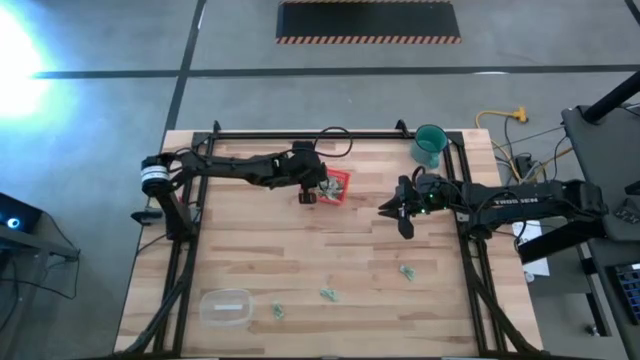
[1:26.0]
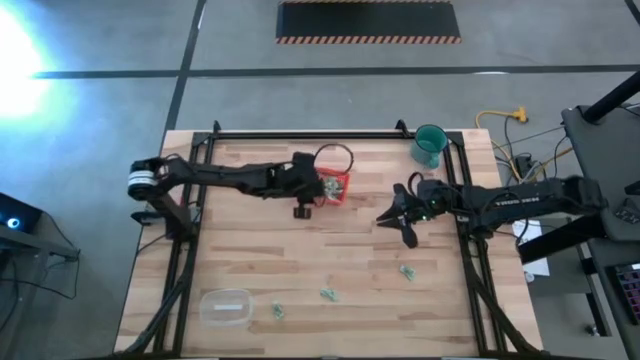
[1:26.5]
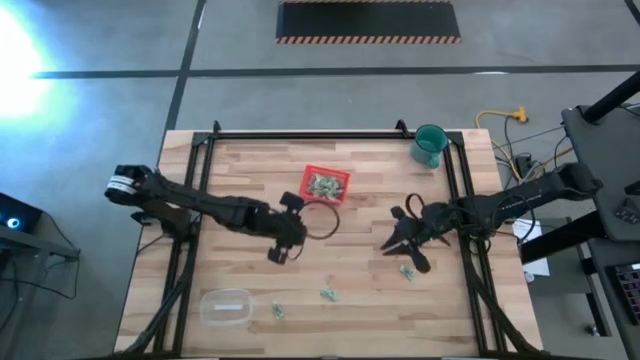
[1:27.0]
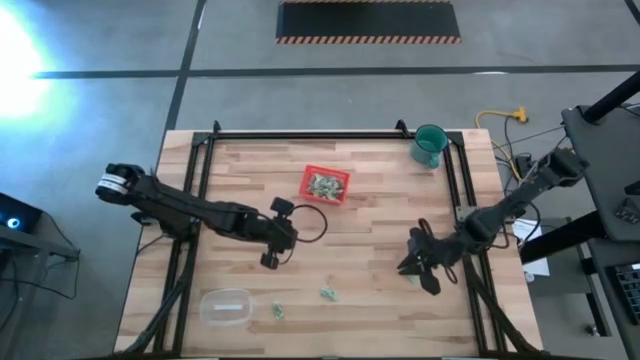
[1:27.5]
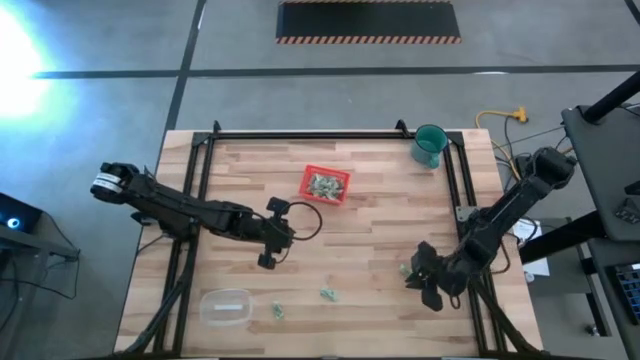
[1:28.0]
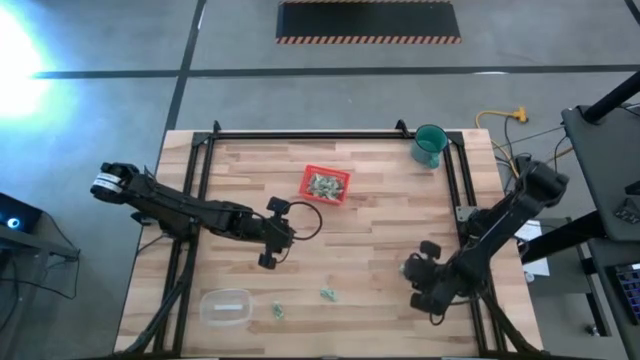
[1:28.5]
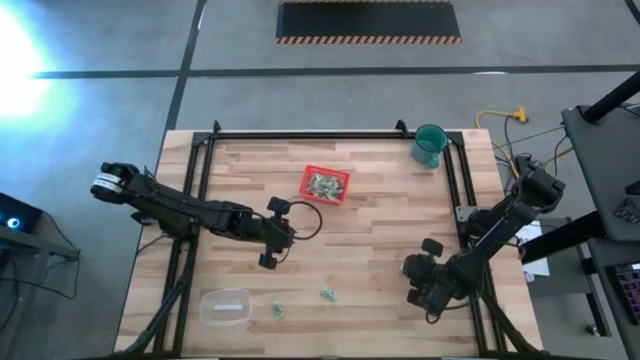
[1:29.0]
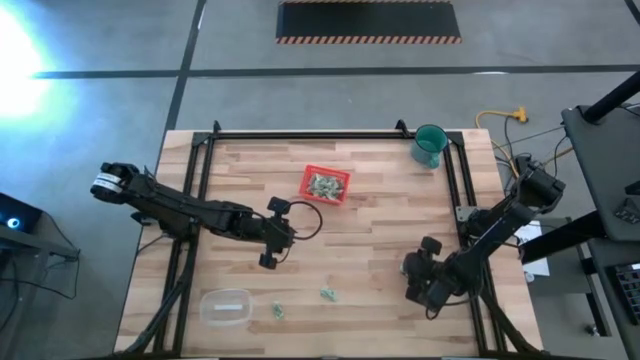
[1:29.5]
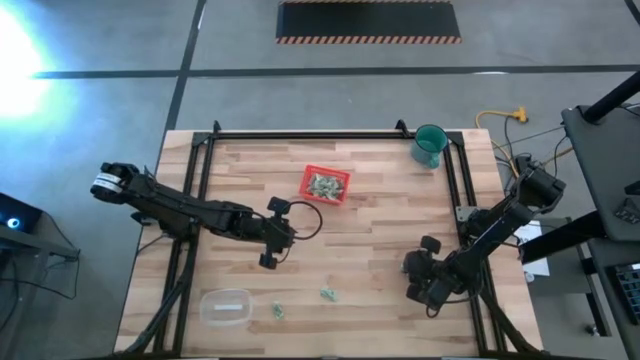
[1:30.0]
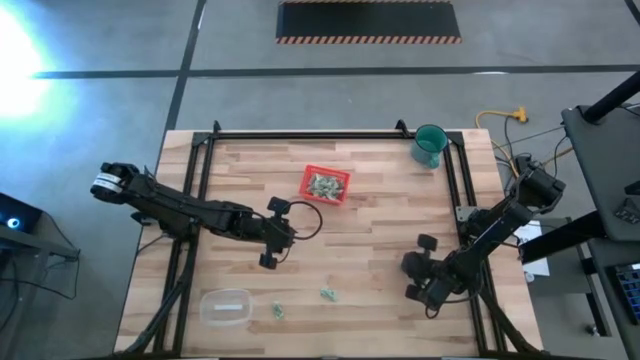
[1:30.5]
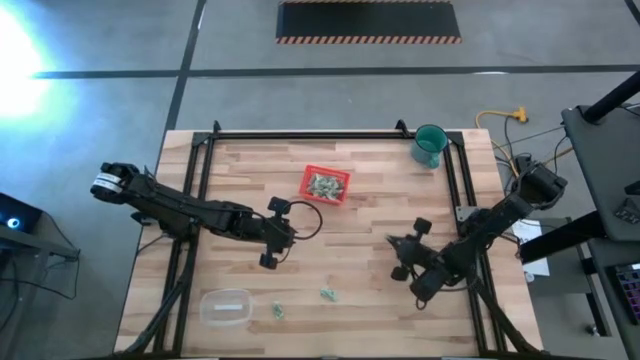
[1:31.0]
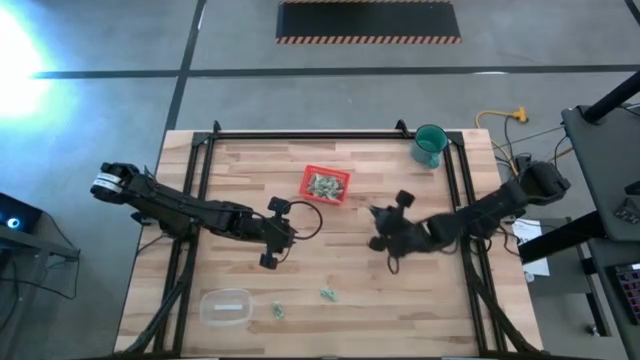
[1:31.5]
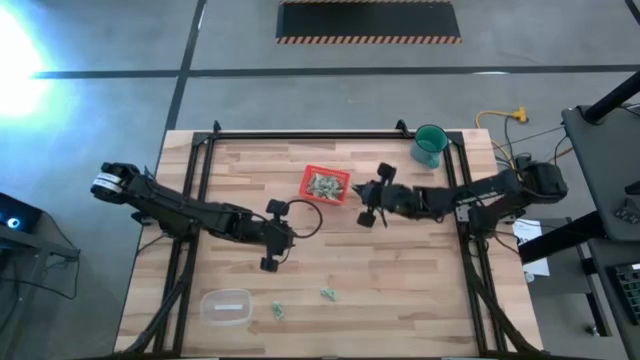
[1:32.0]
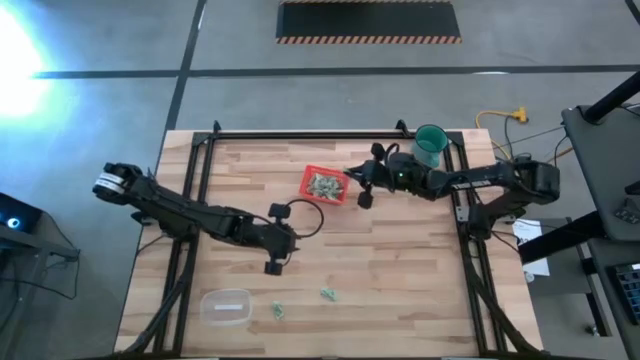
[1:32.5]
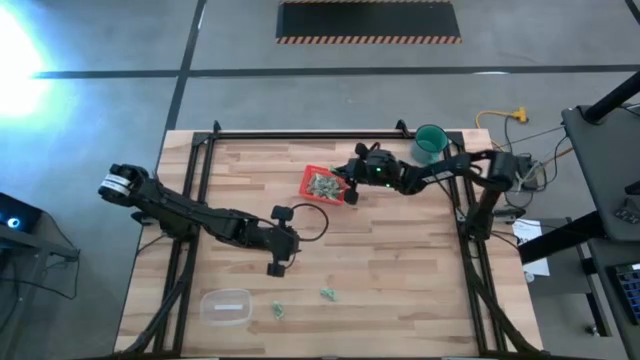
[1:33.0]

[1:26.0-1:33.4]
Task: Pick and place items into bin
Put the stevia packet into the orange bin

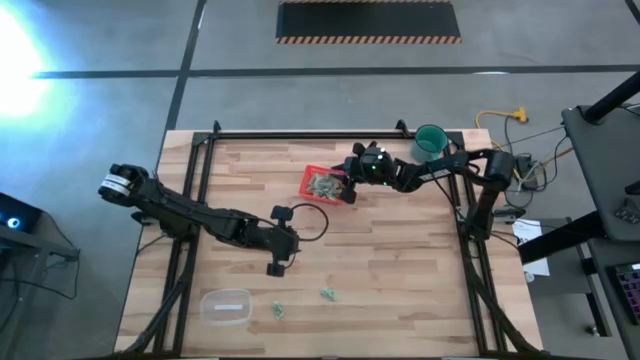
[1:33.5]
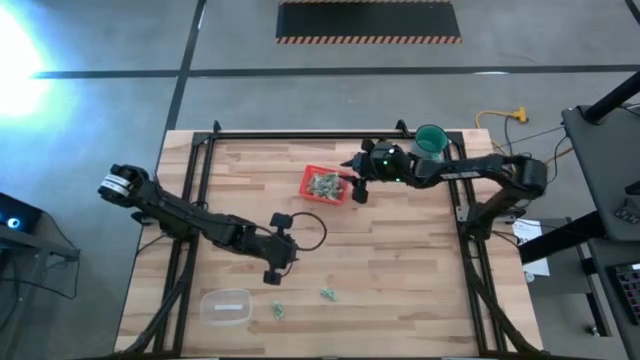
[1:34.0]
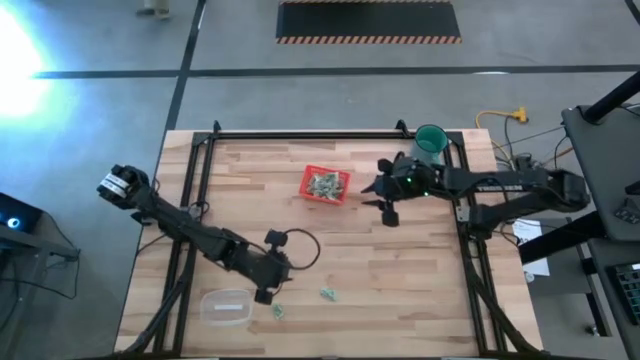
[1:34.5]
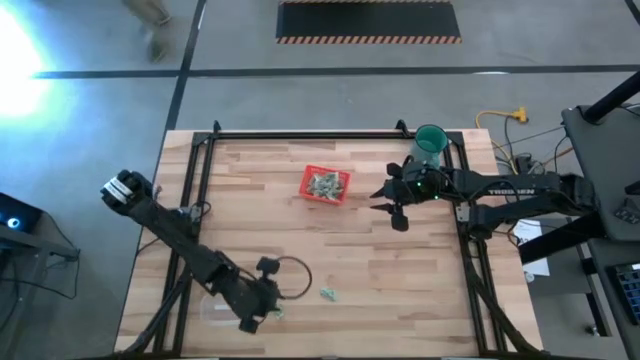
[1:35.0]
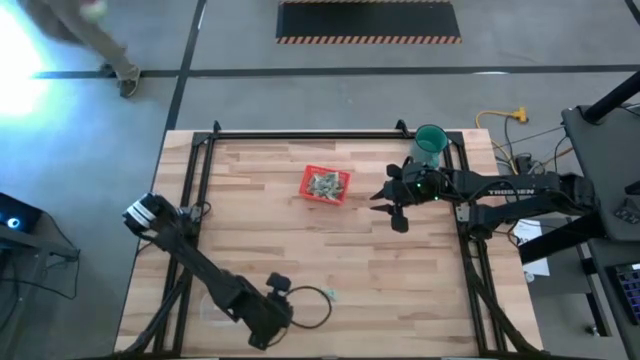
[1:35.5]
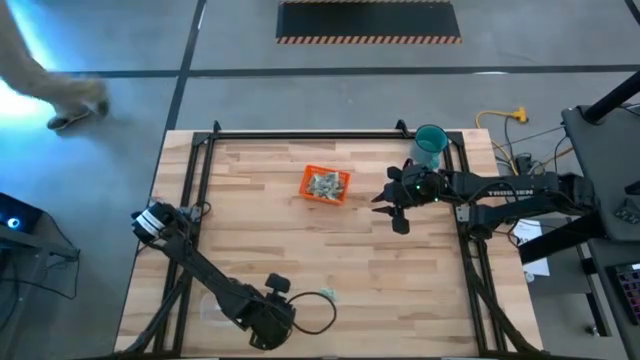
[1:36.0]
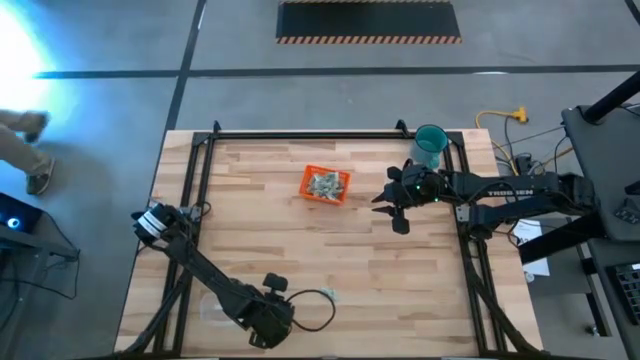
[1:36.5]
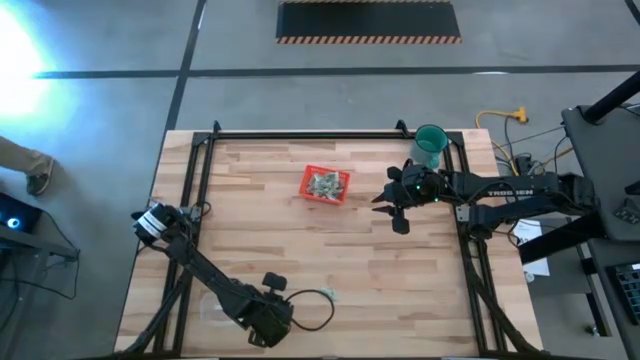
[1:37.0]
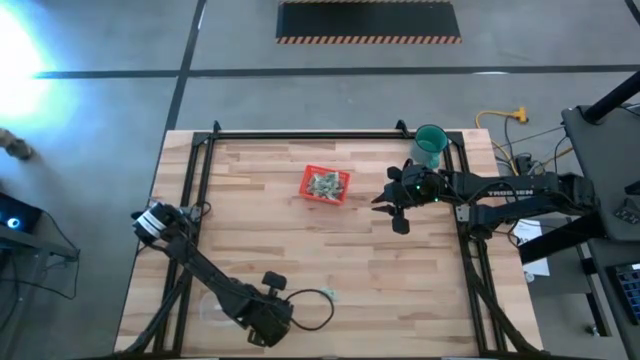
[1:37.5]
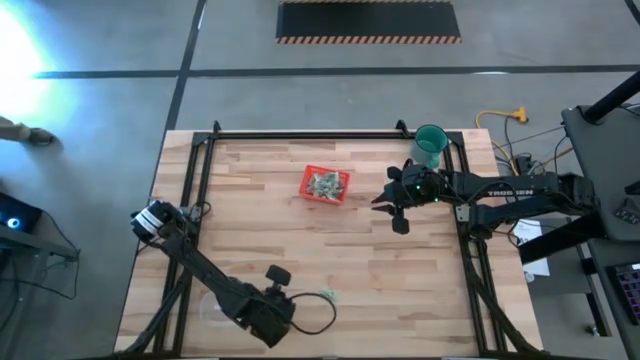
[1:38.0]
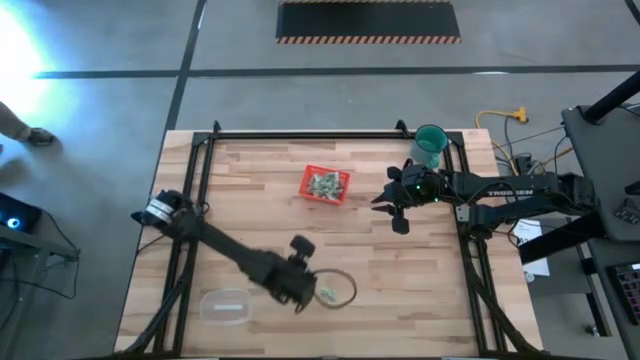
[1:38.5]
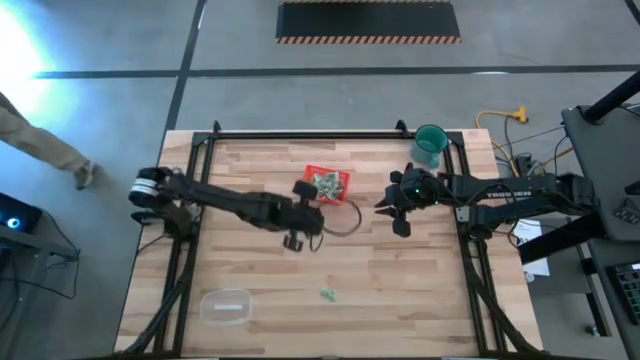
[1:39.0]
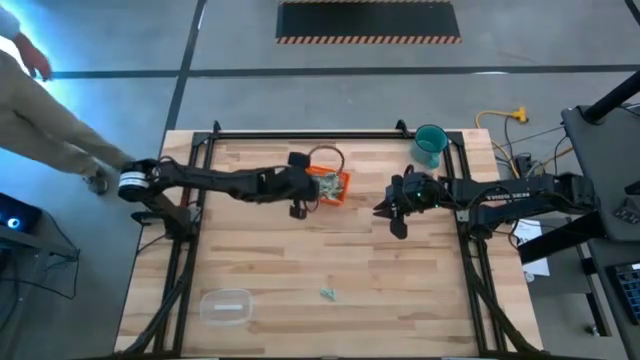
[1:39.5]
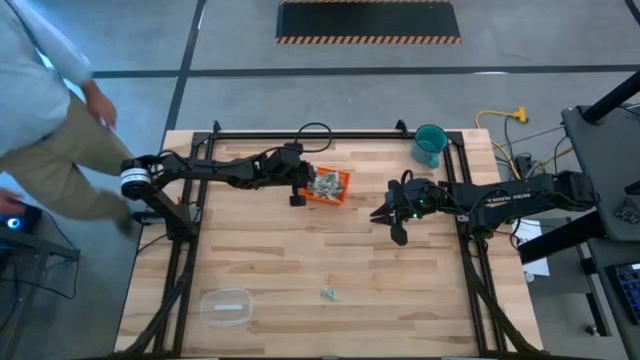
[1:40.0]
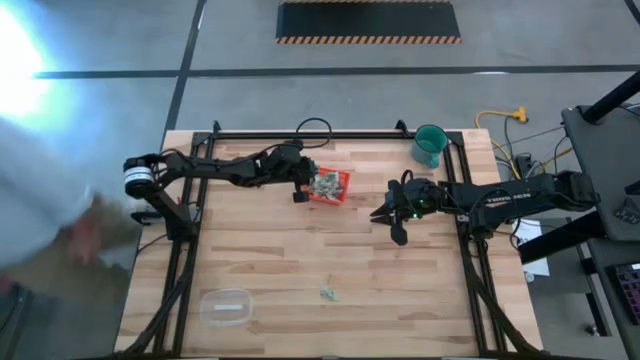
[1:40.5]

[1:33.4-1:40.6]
Put the stevia packet into the orange bin

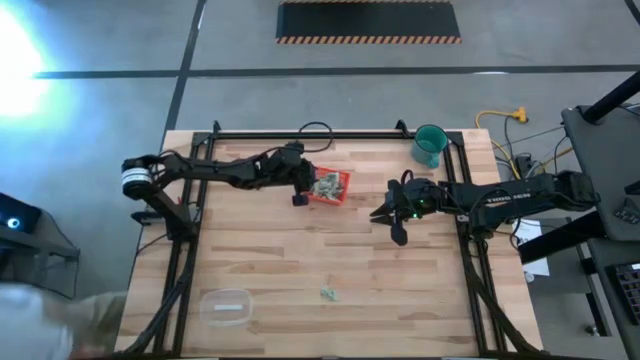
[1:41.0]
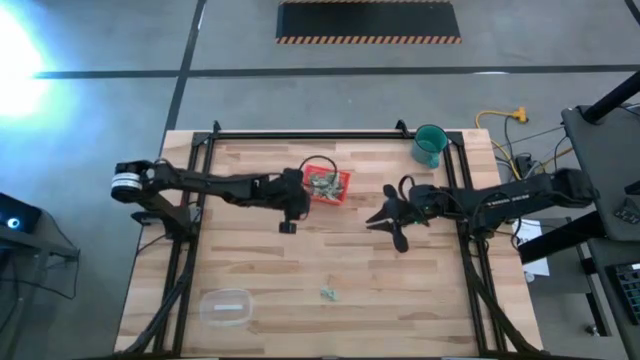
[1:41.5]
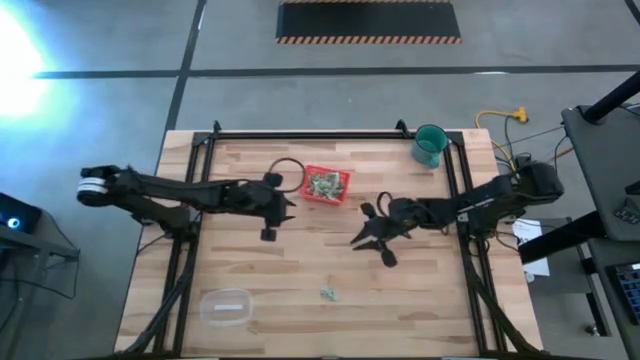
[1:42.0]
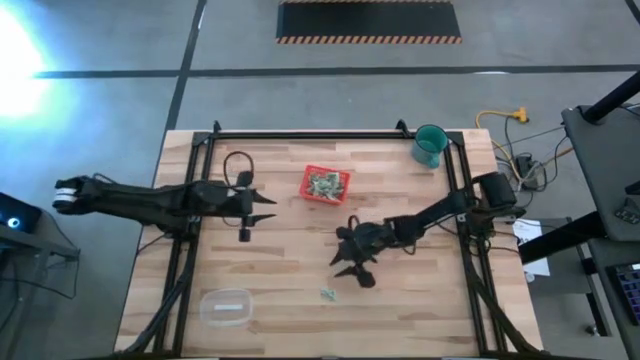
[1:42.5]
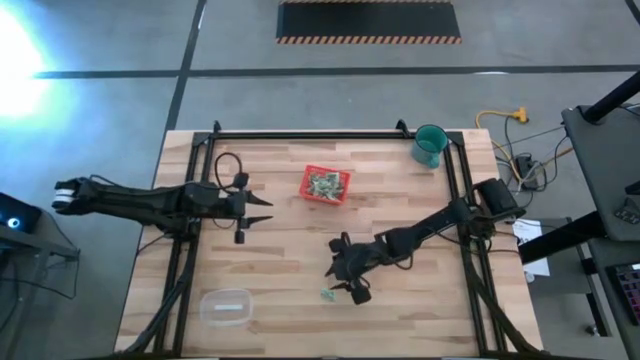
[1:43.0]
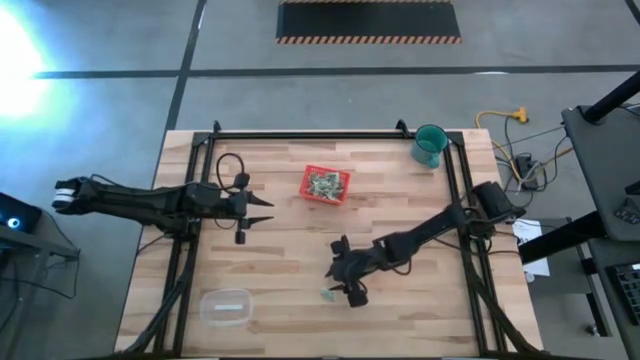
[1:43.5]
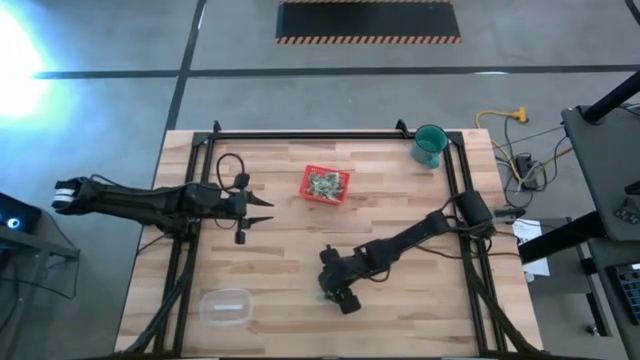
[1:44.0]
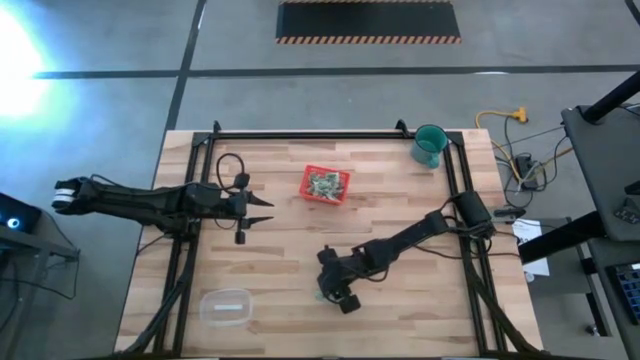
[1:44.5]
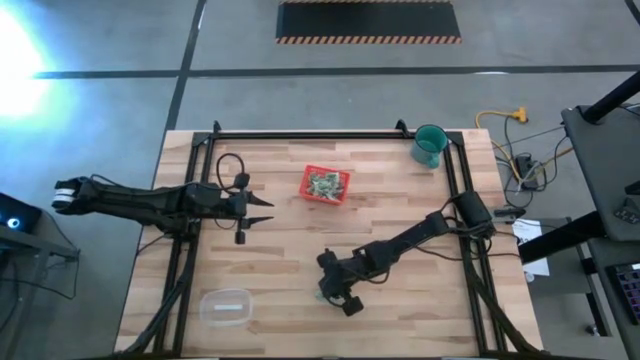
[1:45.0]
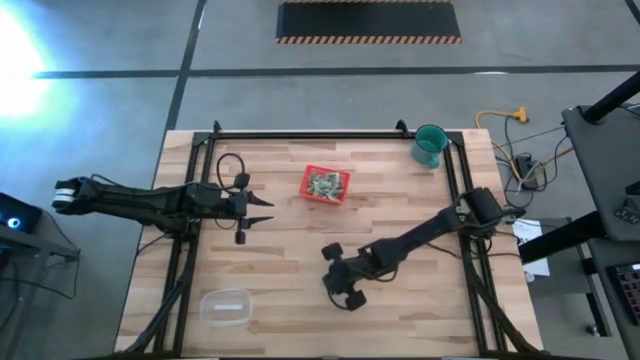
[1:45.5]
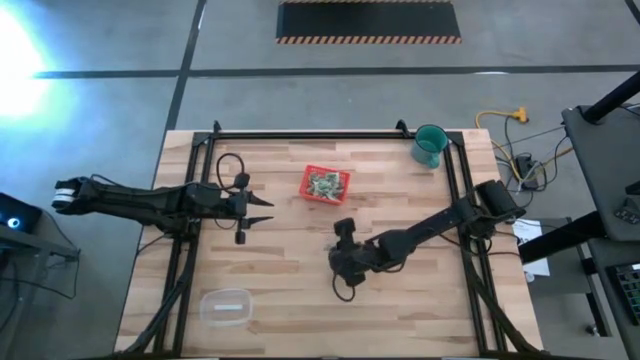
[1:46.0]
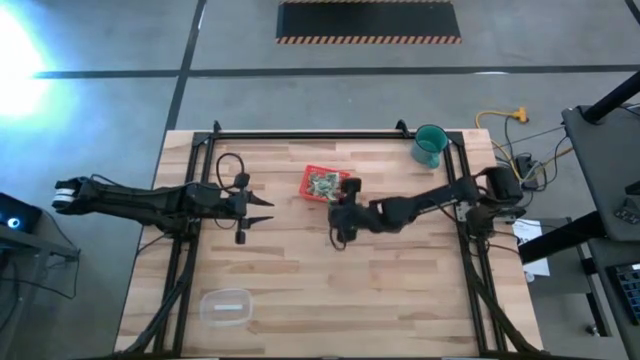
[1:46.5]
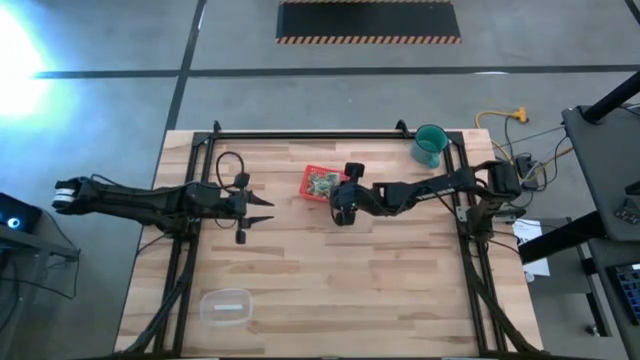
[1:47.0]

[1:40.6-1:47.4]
Put the stevia packet into the orange bin
